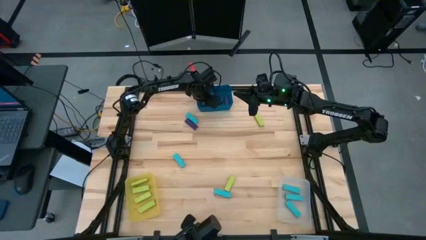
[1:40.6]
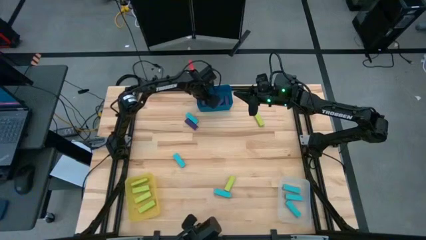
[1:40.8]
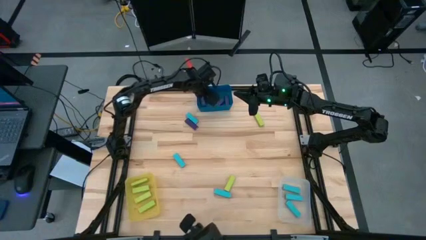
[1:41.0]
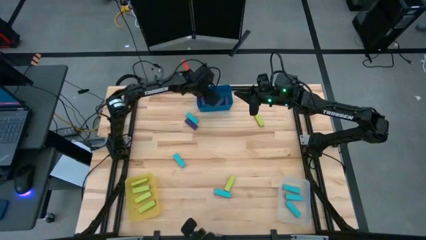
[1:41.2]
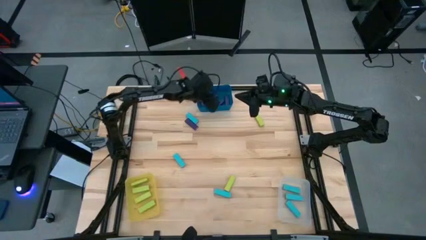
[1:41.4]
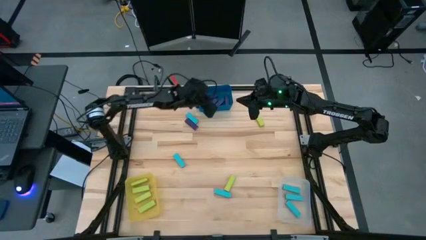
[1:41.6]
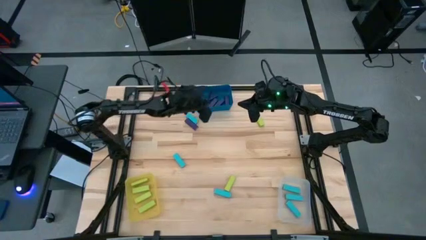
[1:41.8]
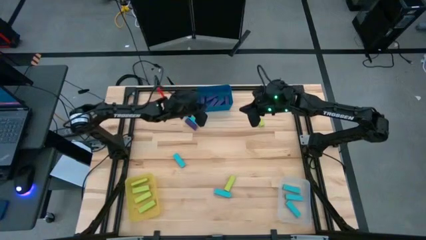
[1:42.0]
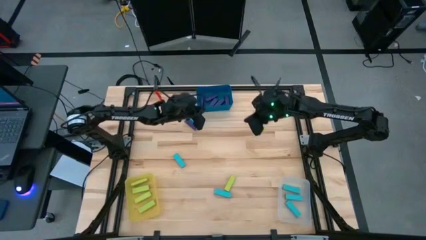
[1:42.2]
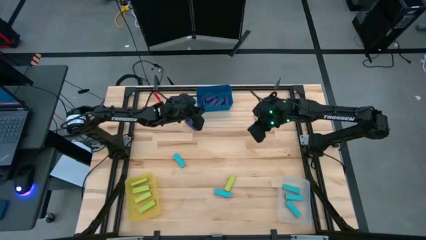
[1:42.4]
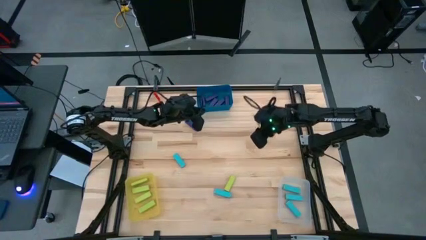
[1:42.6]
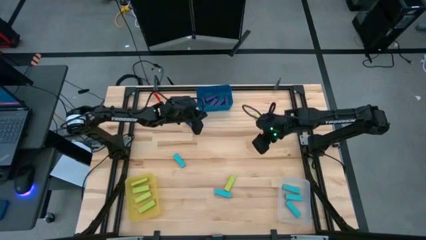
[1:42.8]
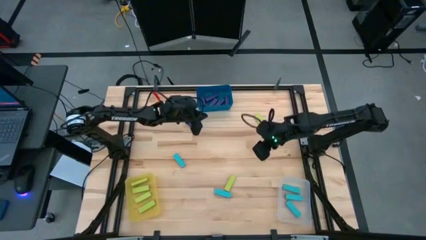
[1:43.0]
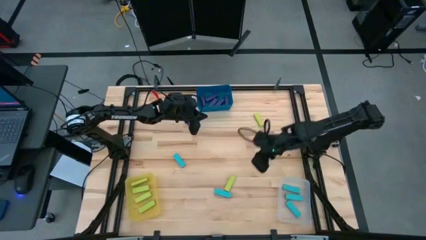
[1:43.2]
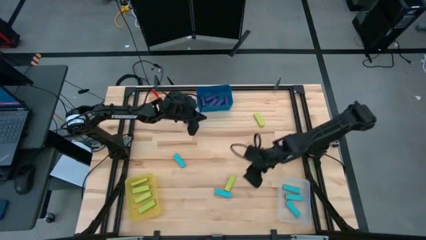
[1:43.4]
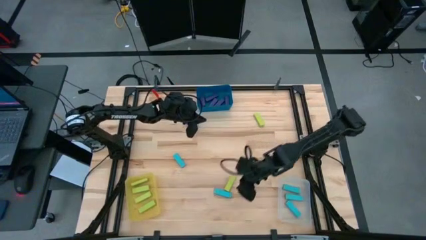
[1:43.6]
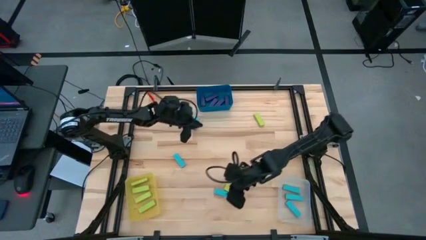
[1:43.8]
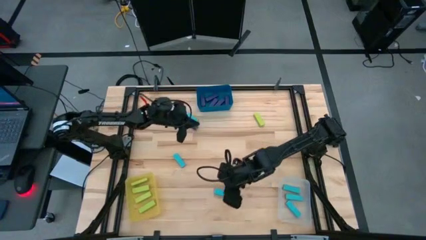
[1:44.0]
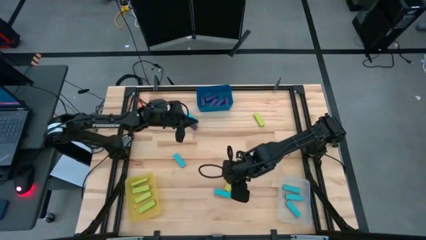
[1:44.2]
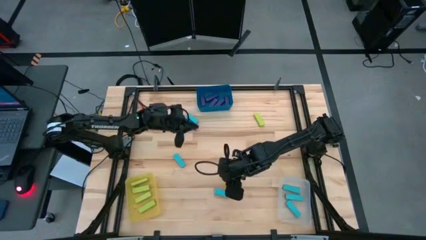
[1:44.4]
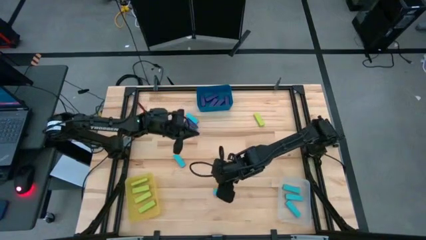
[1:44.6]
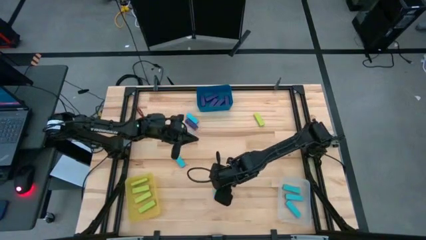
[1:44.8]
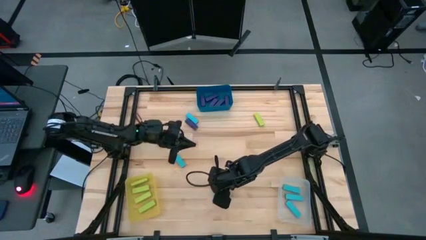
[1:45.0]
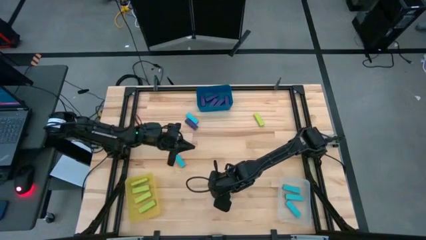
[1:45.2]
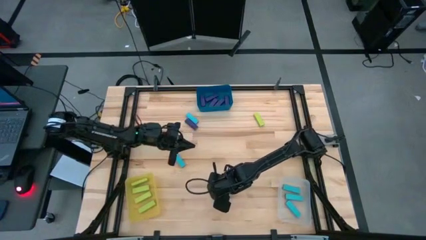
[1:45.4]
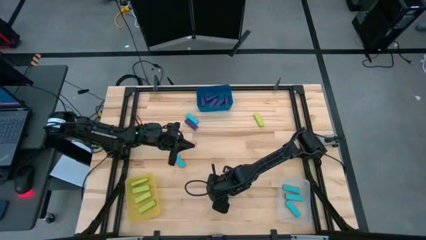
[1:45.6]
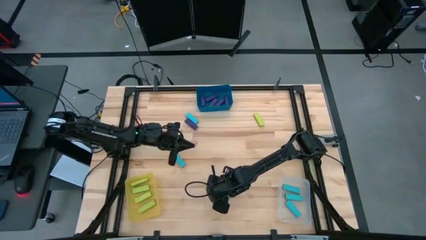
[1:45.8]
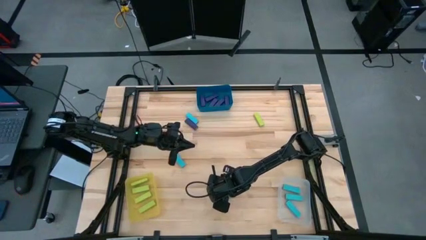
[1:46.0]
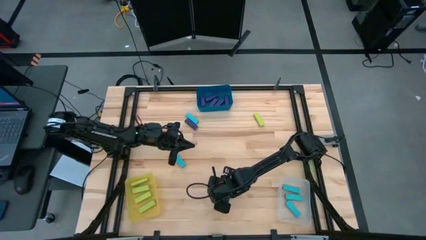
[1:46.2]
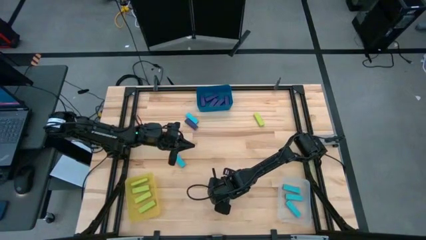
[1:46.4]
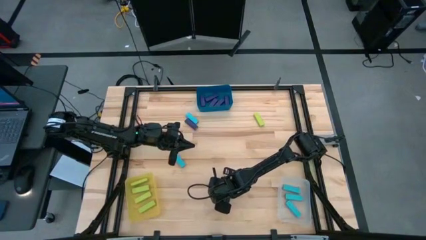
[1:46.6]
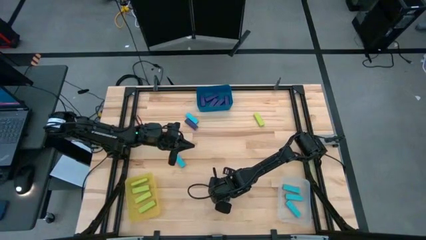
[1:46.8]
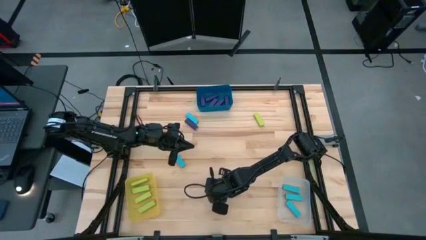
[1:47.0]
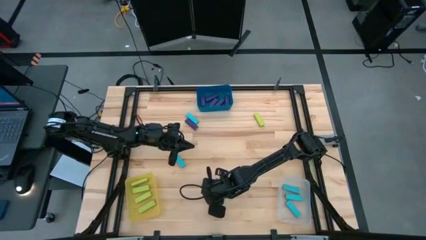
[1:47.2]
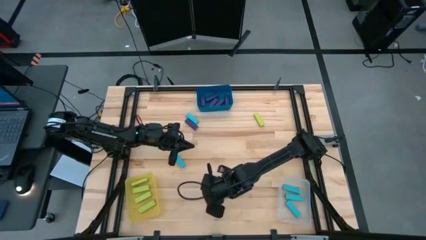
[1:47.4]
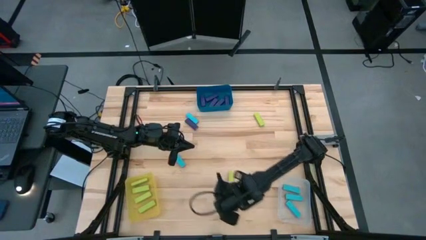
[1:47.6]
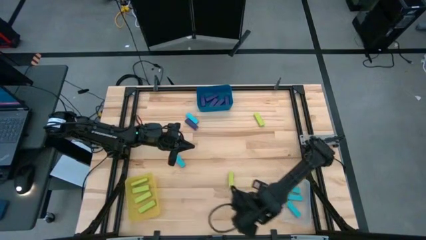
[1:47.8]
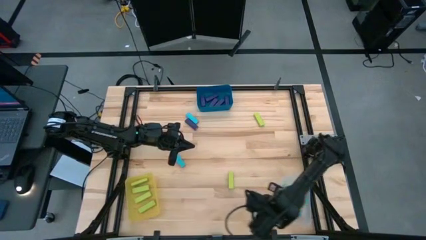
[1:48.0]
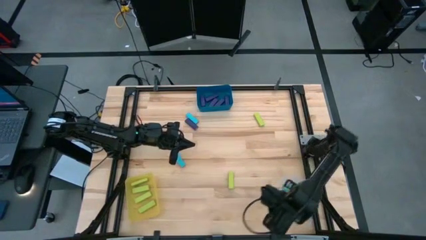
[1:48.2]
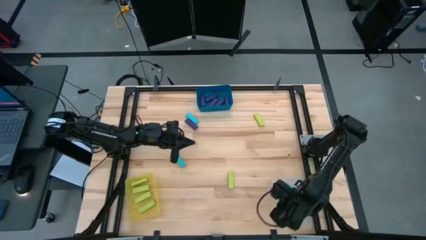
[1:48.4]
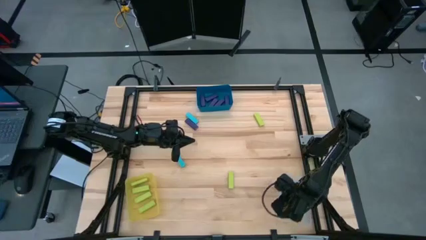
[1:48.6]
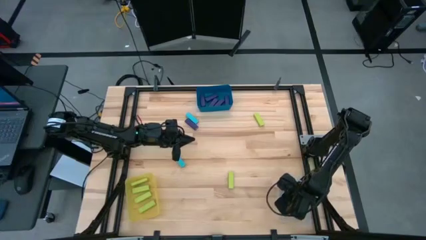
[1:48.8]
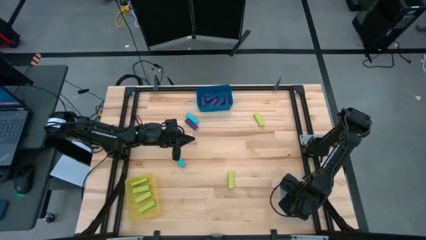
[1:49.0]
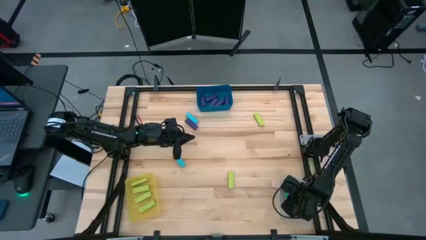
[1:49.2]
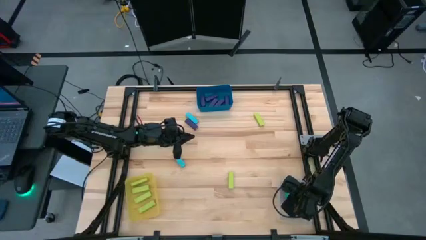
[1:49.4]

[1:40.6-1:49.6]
Task: Sort blocks
Put the sky blue block into the white bin

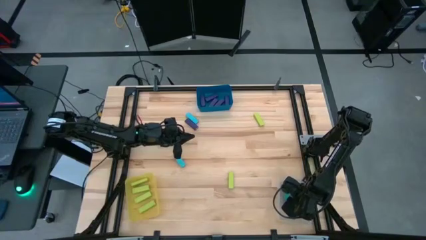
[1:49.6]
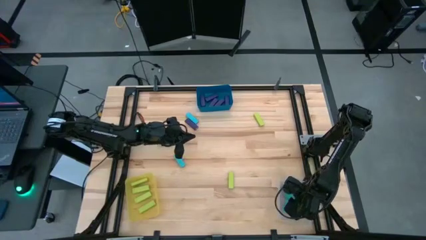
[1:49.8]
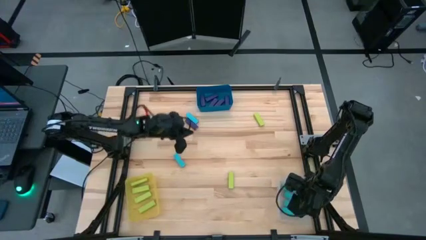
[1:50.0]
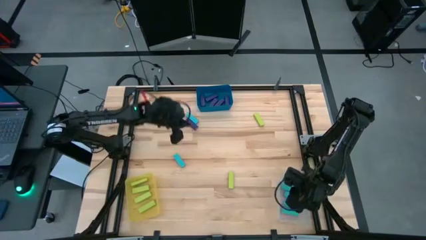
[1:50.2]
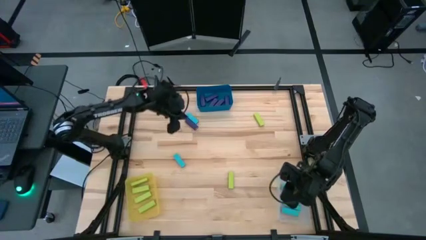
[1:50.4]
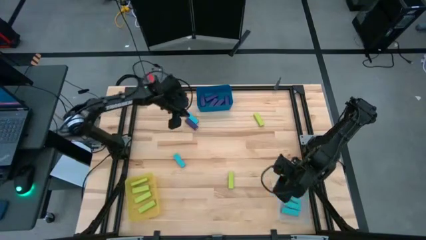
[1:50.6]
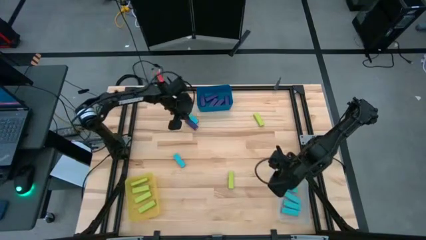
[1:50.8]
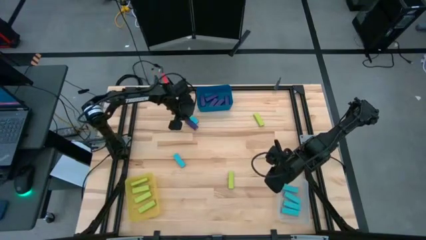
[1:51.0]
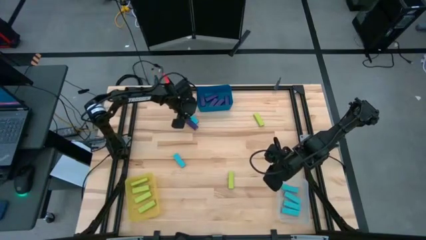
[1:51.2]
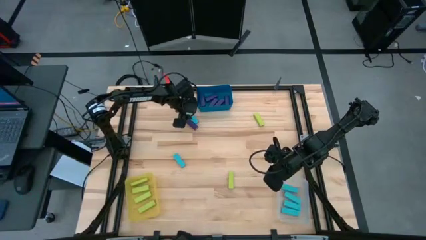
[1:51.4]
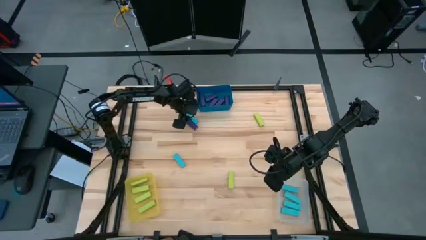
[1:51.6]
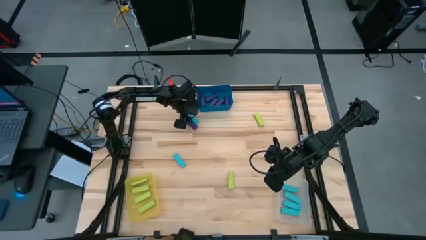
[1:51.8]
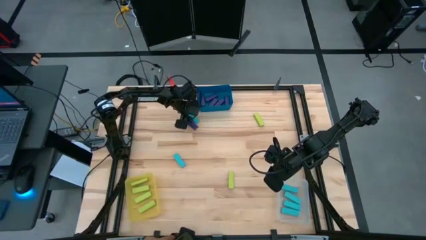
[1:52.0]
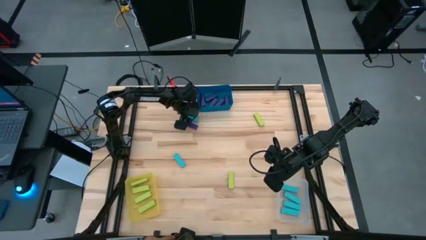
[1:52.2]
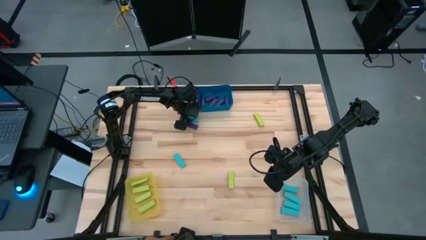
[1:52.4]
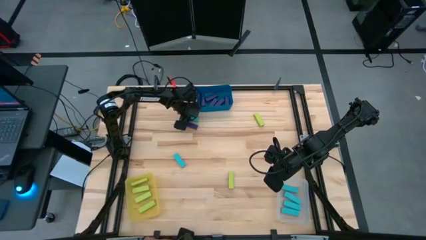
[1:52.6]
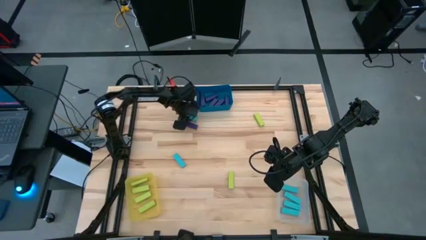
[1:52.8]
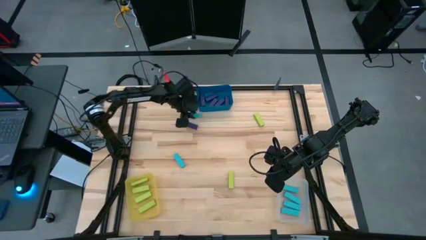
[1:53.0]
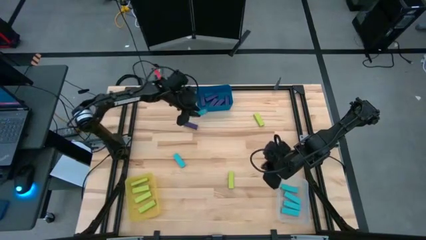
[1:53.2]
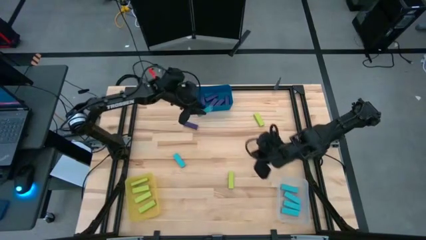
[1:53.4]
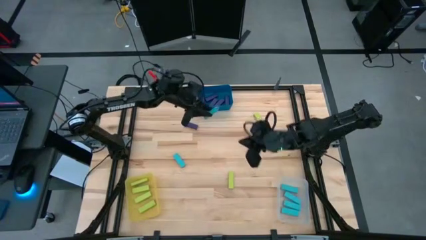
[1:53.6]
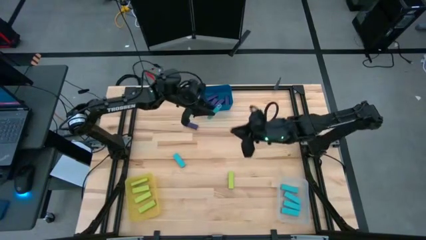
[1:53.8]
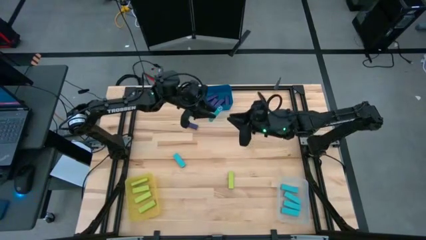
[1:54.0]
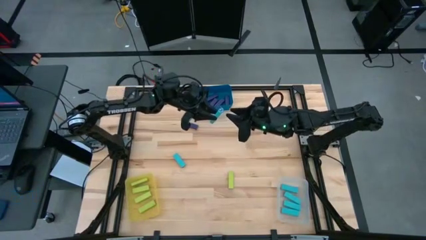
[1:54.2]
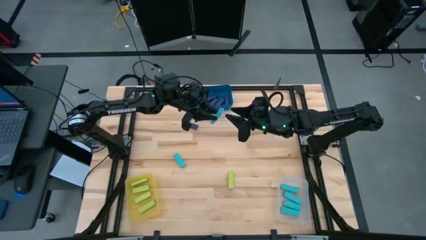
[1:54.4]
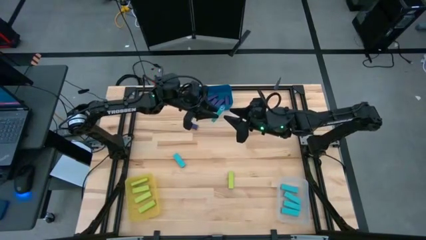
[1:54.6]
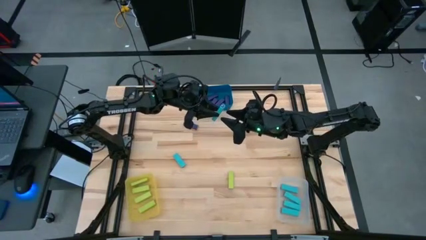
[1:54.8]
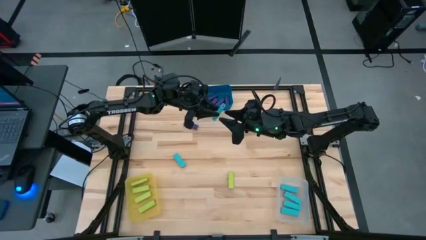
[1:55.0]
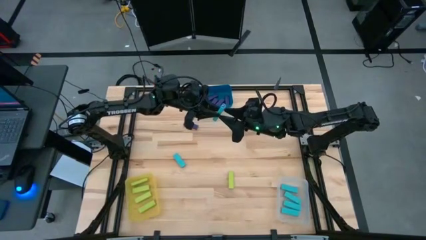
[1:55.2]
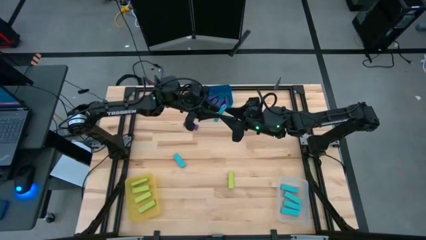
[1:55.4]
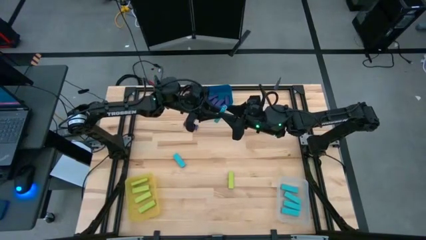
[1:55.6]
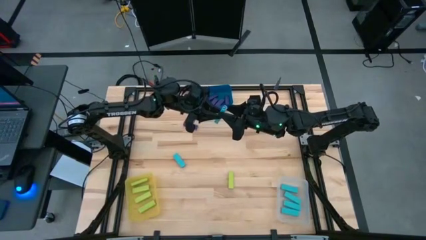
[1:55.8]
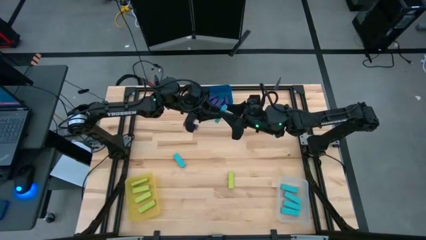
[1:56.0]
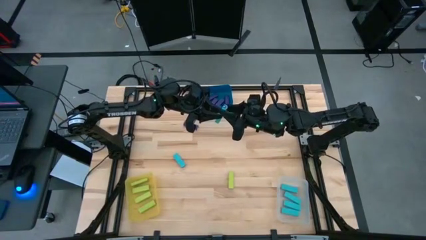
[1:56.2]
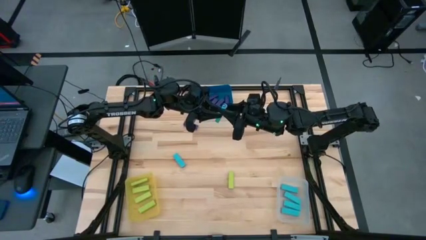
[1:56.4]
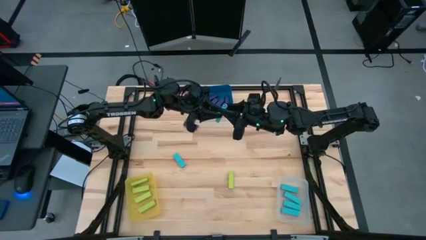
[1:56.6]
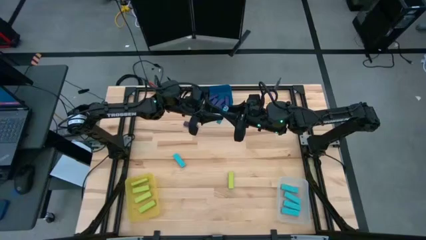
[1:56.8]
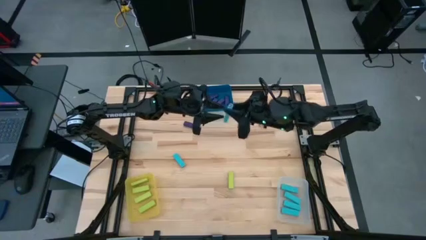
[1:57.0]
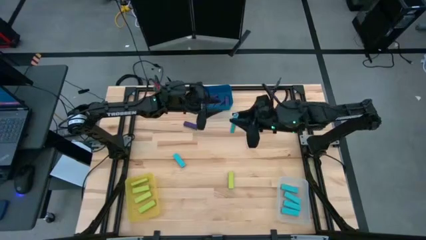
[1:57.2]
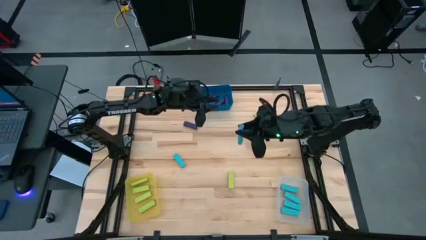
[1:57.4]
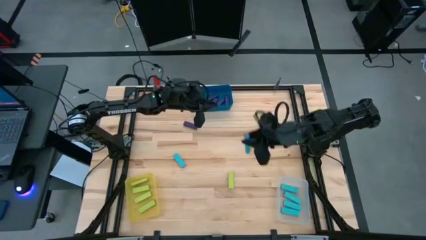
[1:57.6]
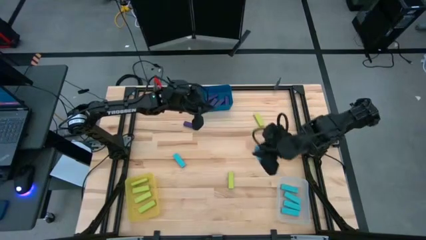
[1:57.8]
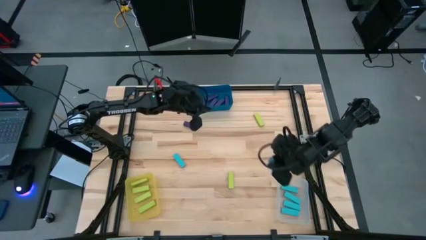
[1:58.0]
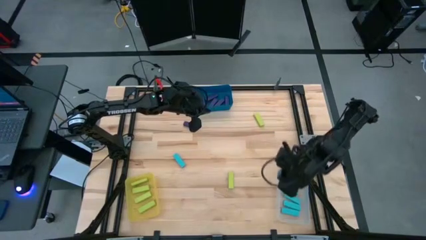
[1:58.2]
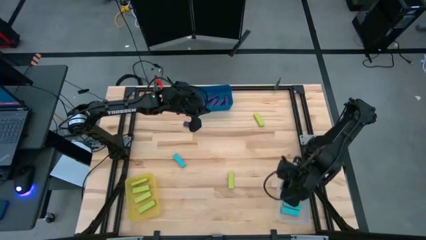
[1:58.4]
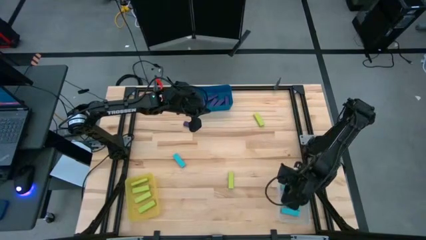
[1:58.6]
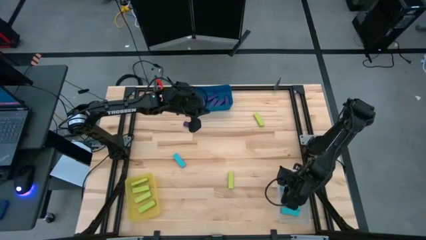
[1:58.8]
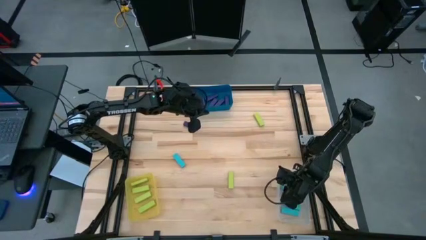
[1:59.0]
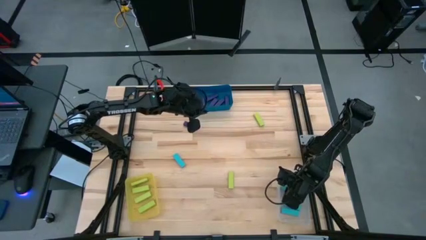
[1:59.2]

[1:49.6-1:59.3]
Put the sky blue block into the white bin
